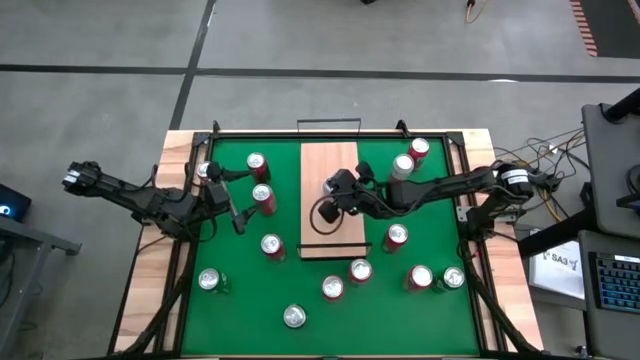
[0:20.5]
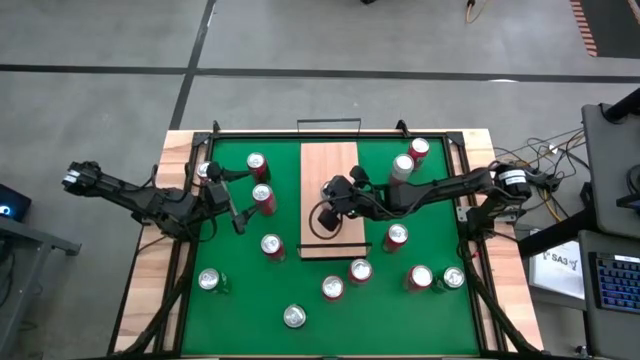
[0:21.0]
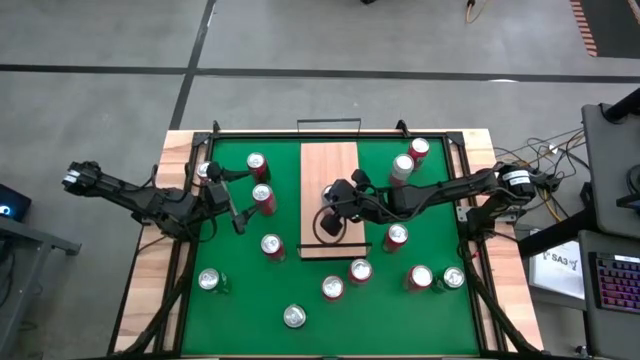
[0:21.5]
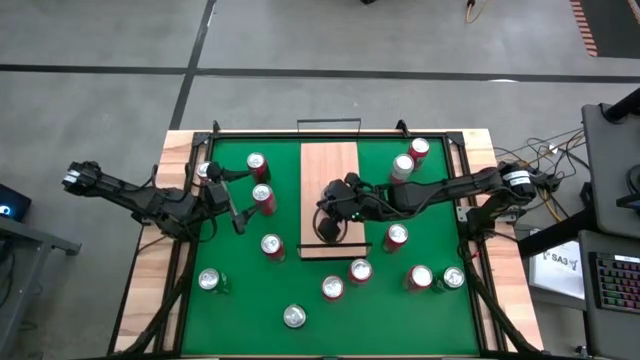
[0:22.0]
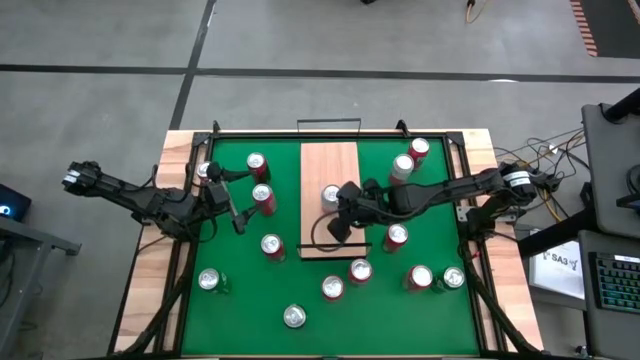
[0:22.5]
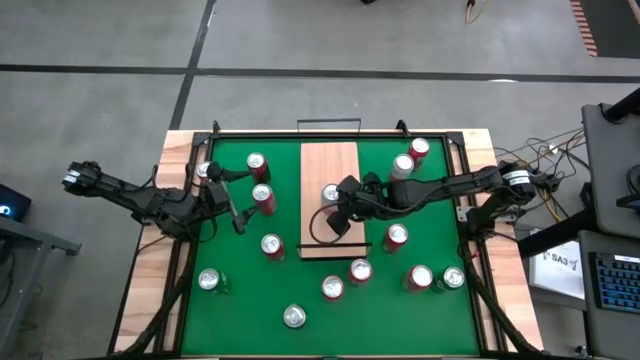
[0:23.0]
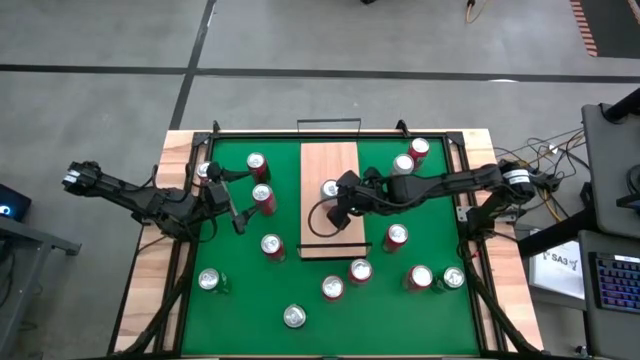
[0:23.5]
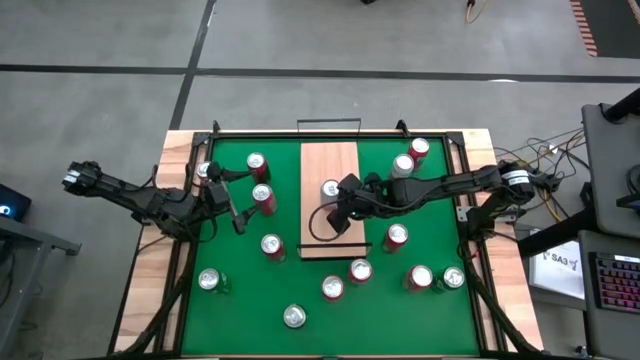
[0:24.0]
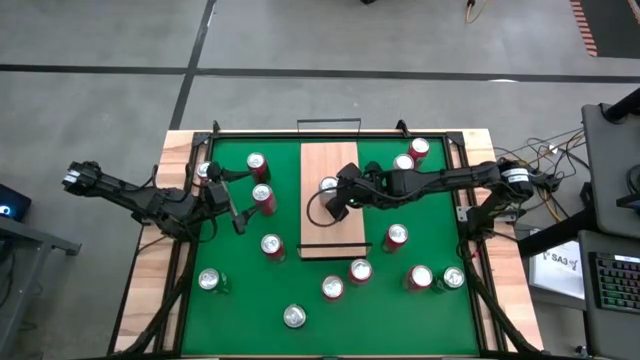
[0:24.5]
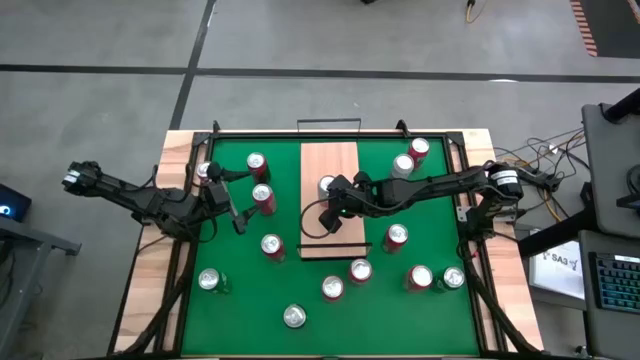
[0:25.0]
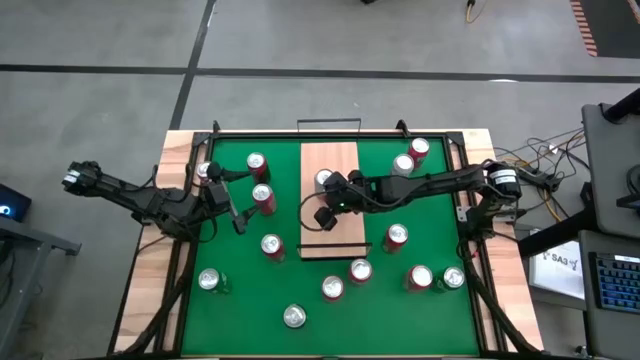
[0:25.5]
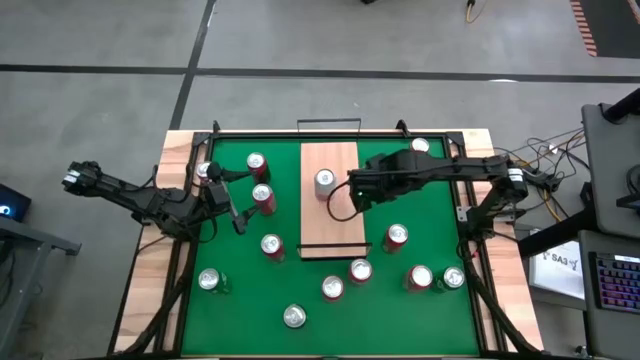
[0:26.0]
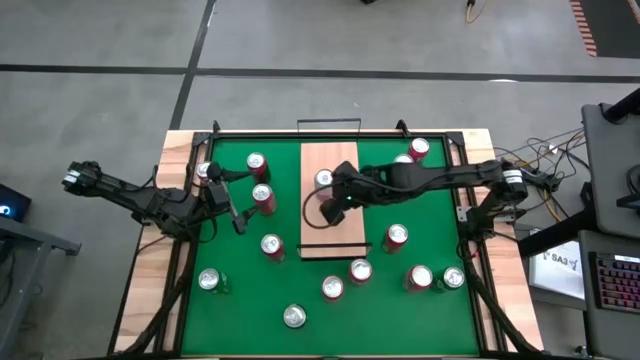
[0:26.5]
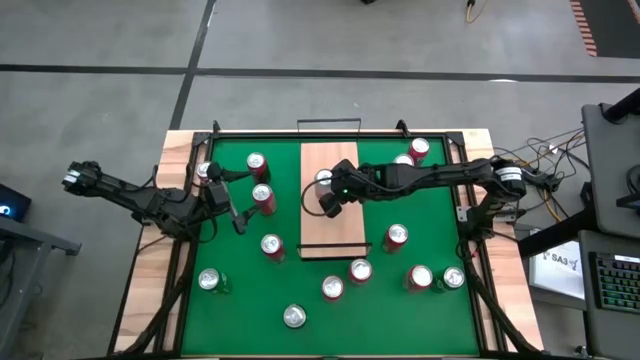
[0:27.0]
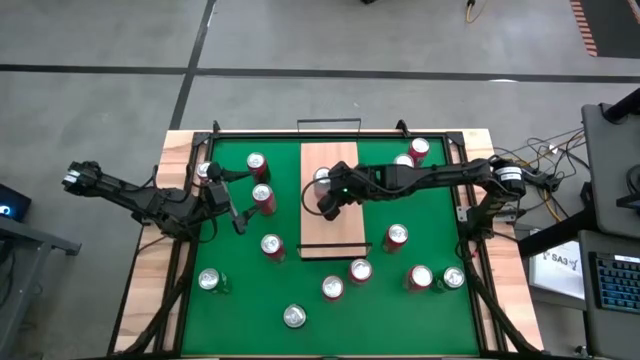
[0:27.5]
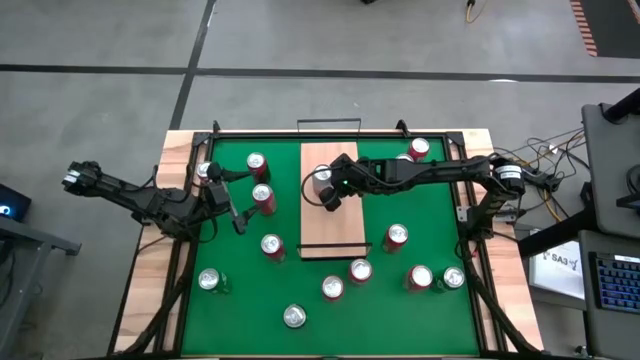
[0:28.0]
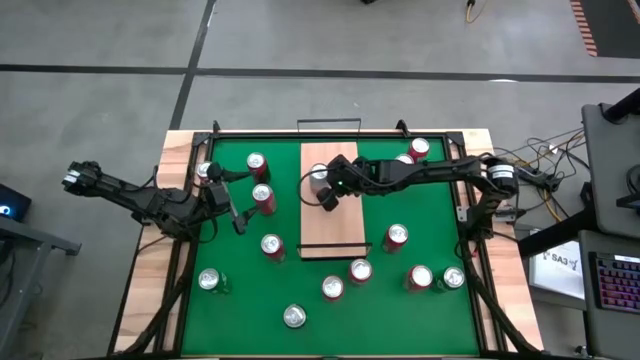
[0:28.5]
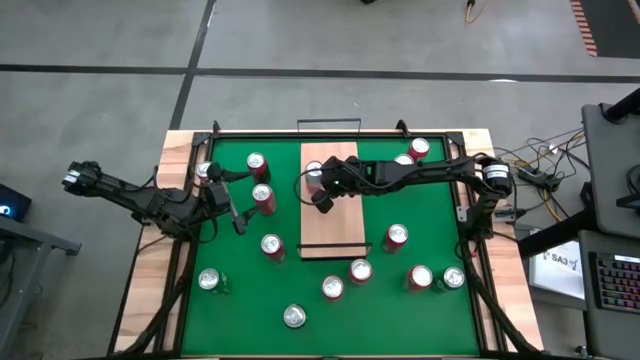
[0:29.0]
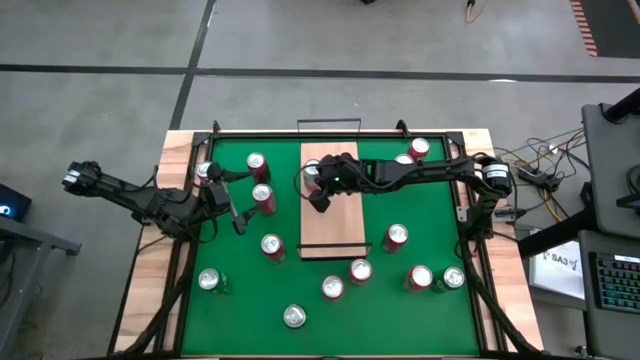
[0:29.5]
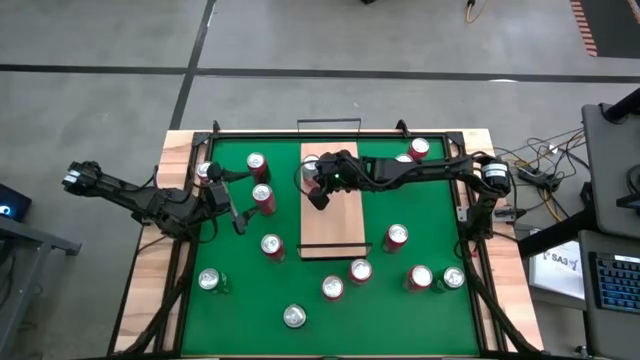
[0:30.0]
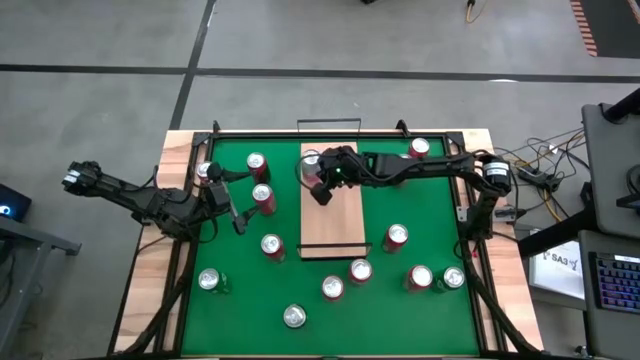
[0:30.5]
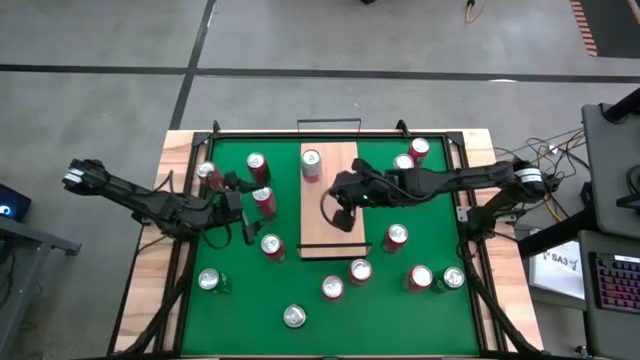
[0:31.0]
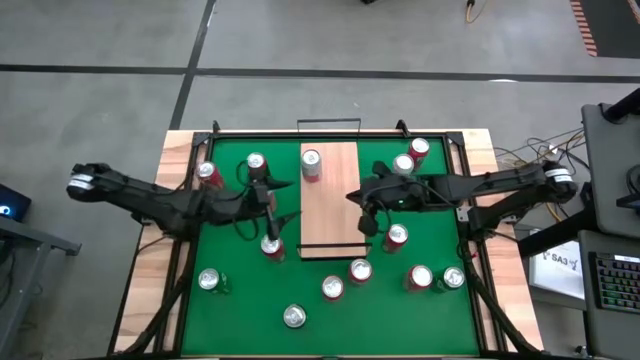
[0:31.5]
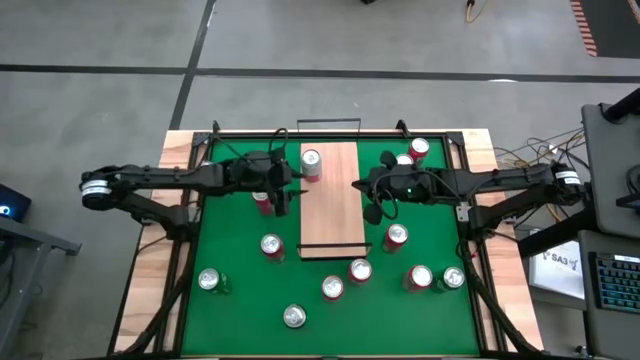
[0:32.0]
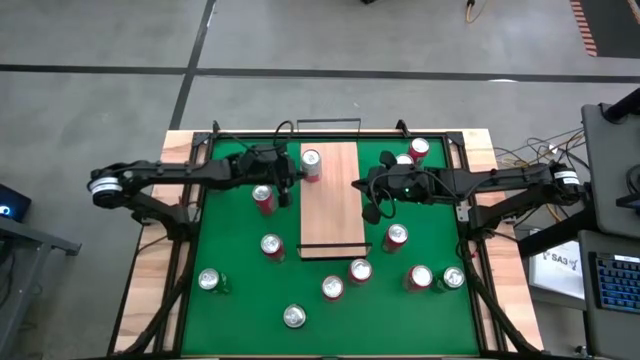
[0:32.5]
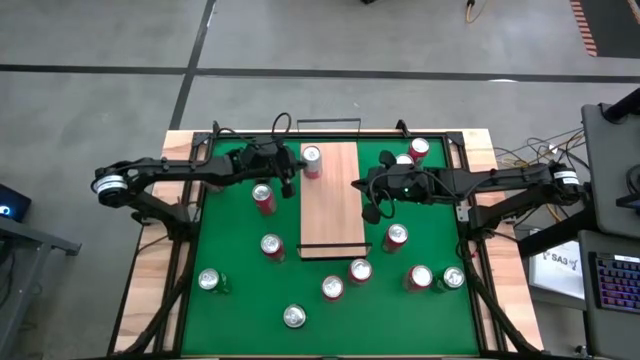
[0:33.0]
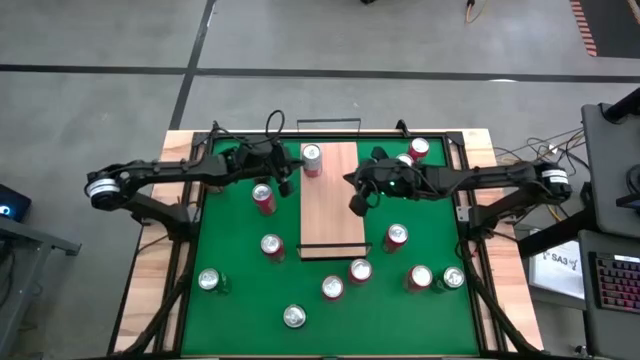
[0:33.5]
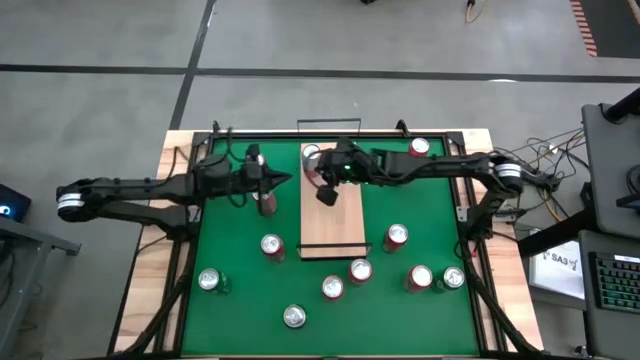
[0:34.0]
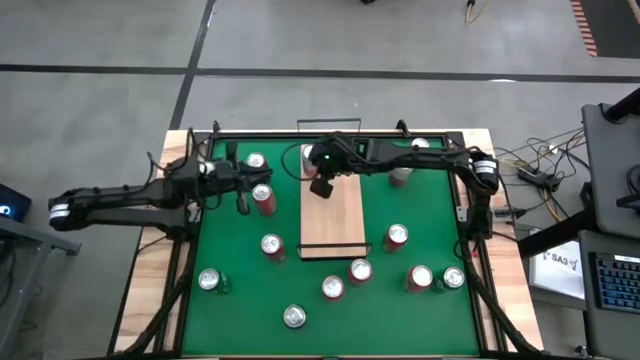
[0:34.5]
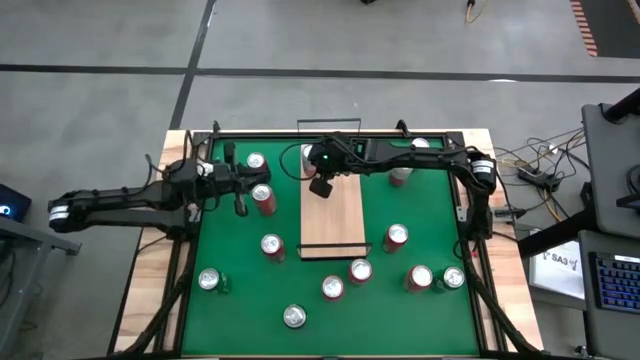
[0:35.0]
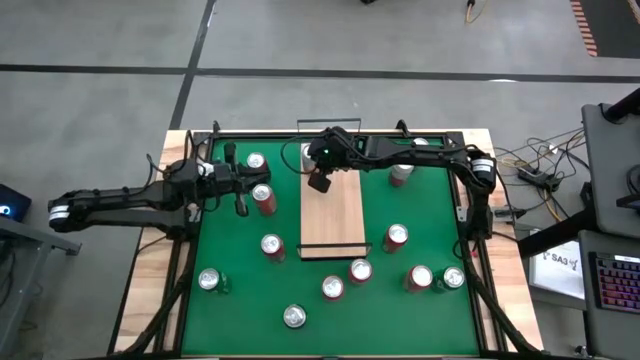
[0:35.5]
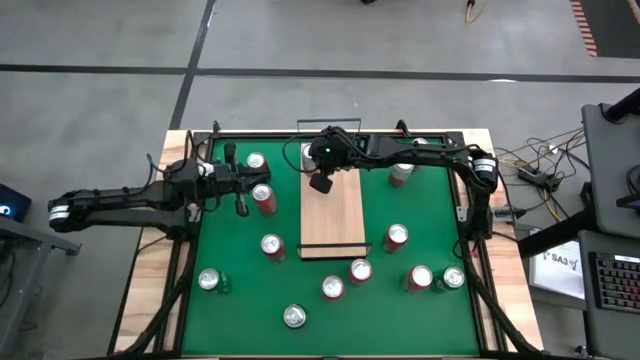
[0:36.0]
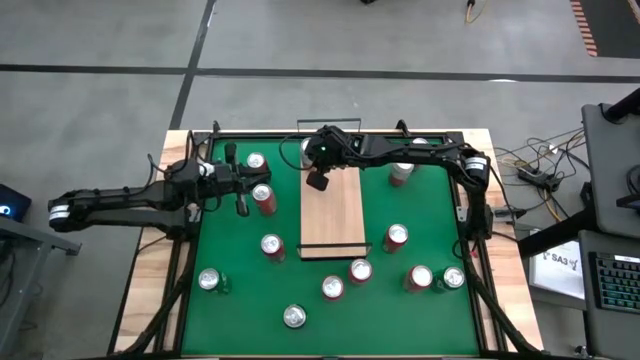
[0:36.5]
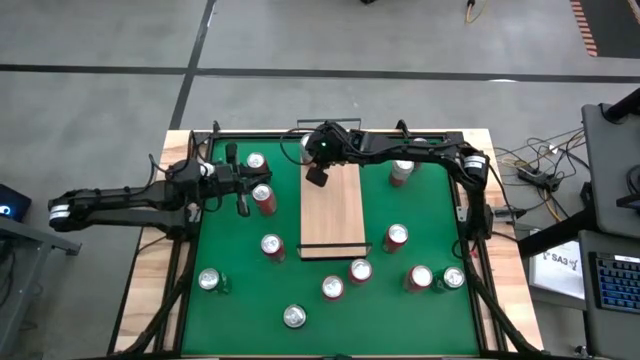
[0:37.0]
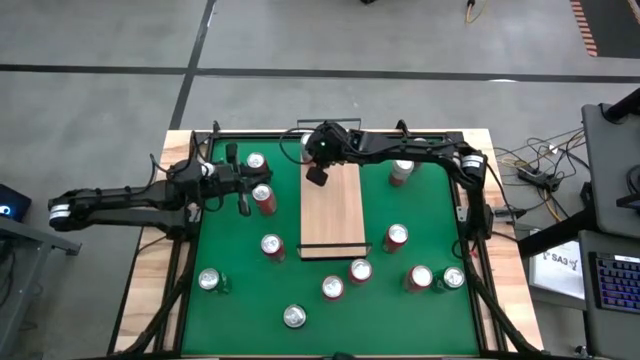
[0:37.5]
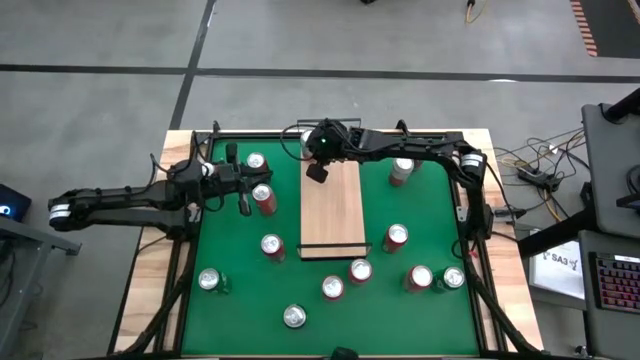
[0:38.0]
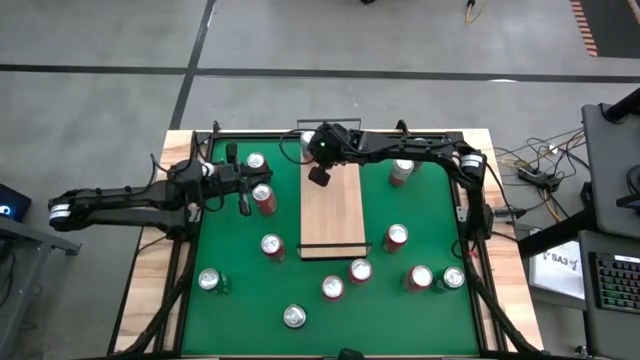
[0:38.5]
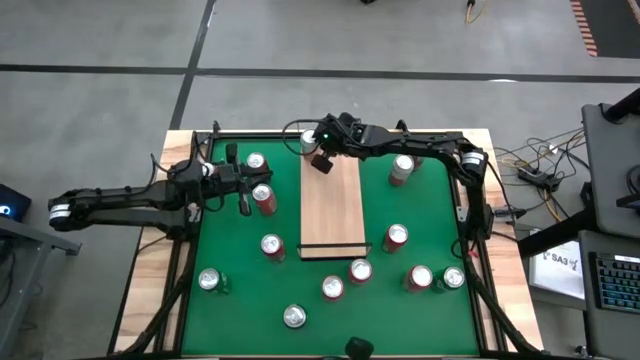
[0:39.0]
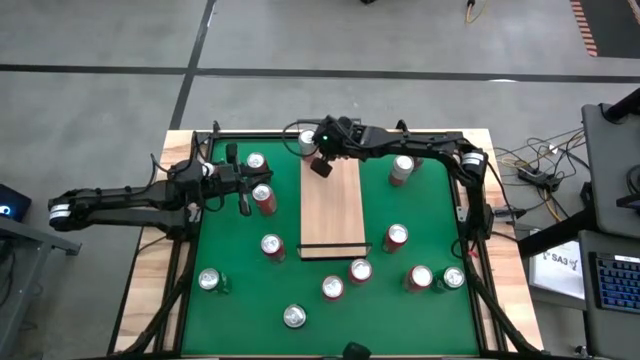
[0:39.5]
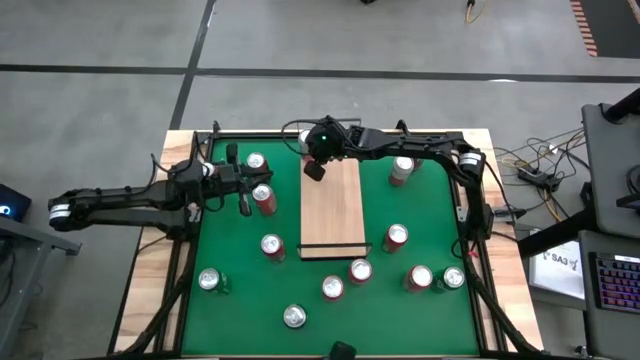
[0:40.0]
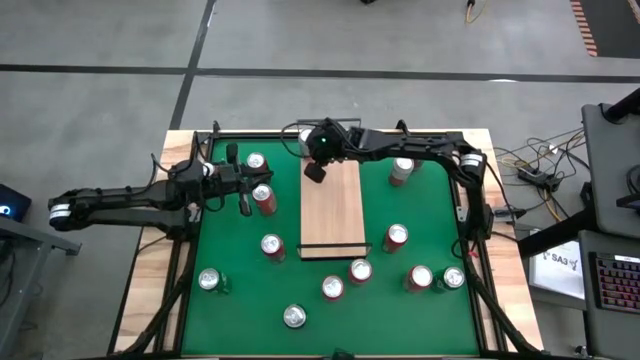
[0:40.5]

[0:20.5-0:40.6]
Task: Place canned beverage on shelf
Put the white and pink soda can on the shelf
